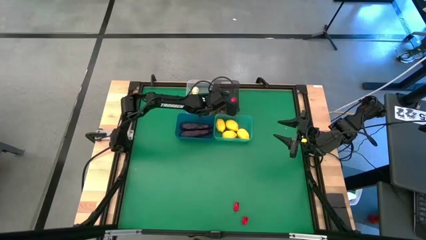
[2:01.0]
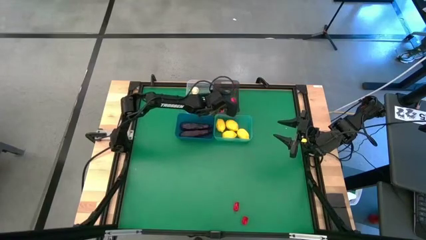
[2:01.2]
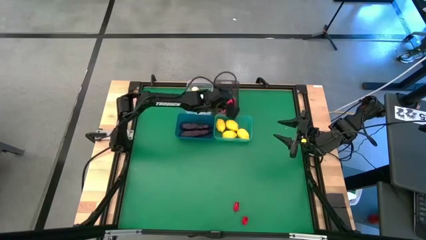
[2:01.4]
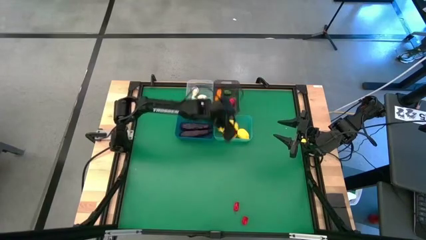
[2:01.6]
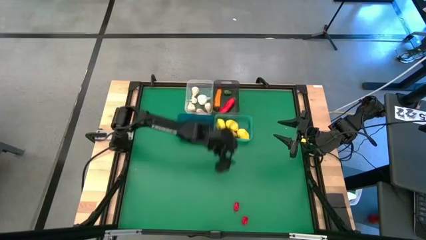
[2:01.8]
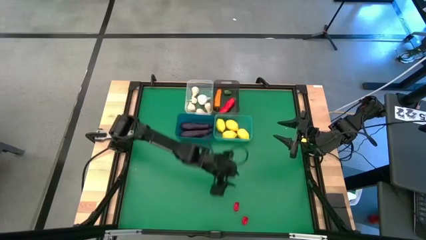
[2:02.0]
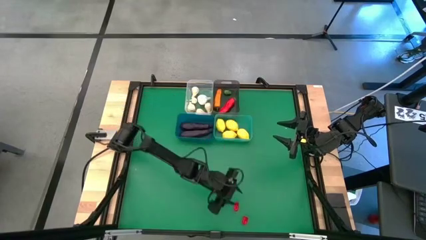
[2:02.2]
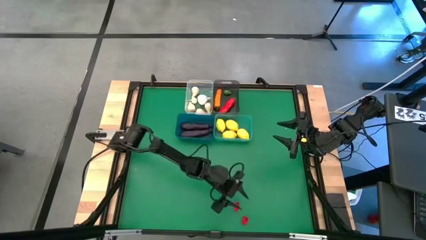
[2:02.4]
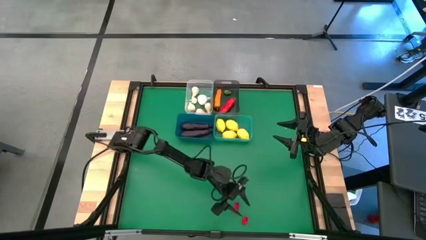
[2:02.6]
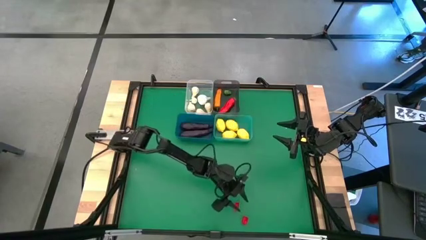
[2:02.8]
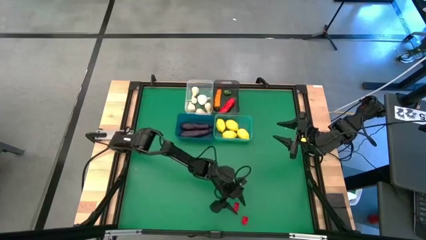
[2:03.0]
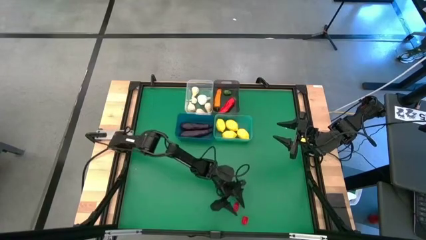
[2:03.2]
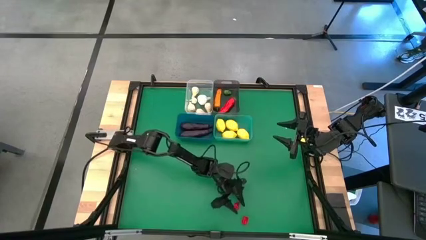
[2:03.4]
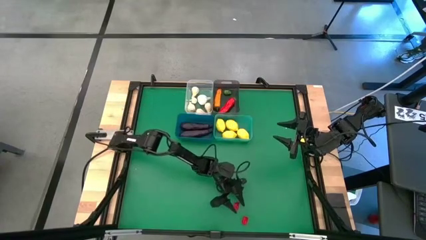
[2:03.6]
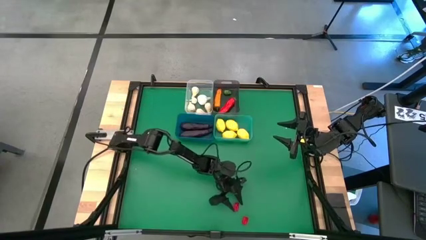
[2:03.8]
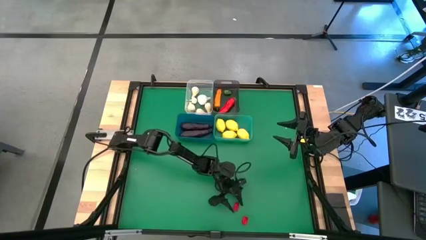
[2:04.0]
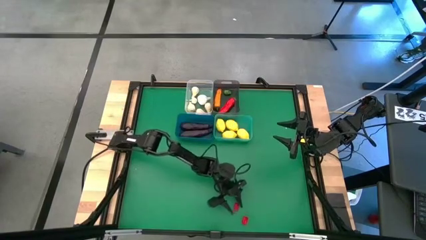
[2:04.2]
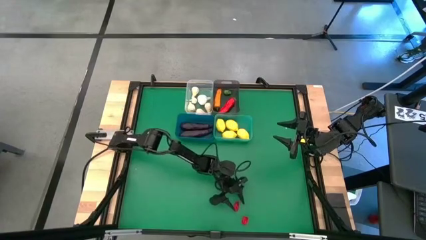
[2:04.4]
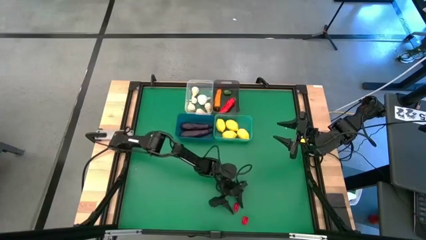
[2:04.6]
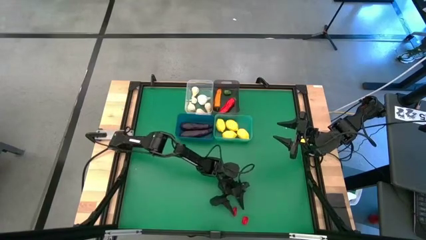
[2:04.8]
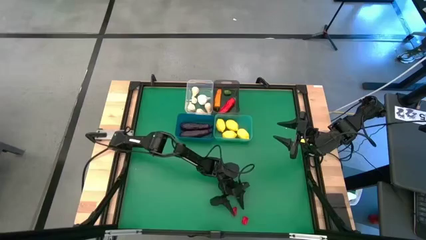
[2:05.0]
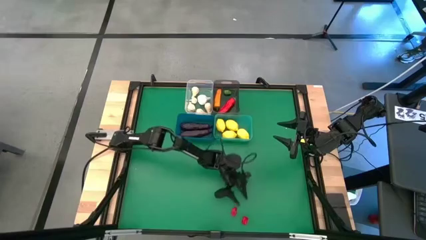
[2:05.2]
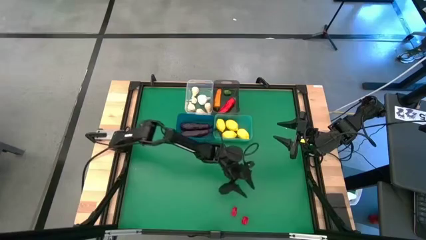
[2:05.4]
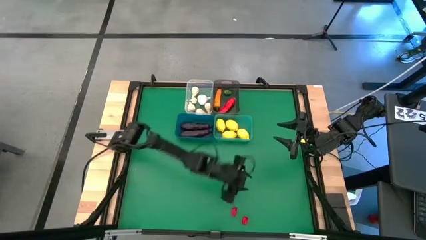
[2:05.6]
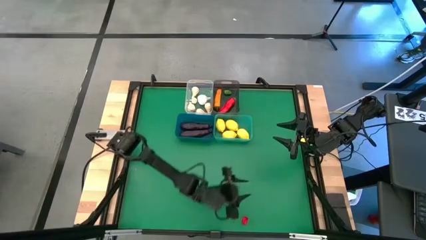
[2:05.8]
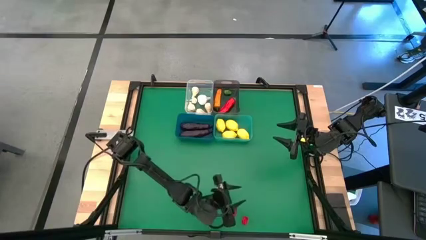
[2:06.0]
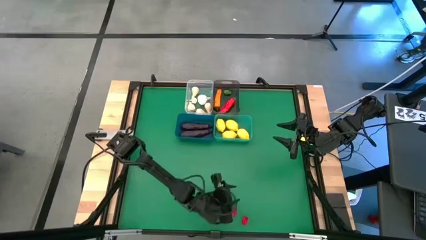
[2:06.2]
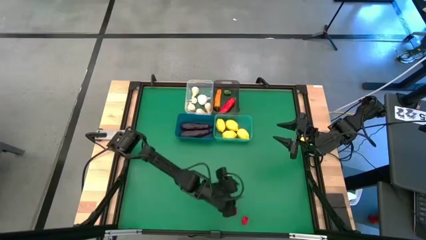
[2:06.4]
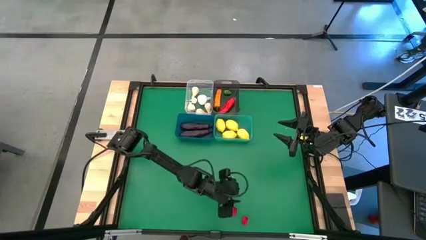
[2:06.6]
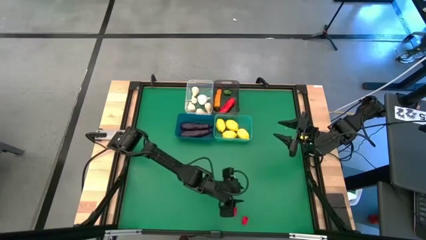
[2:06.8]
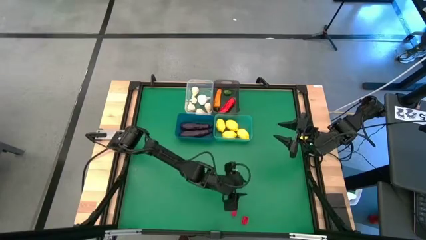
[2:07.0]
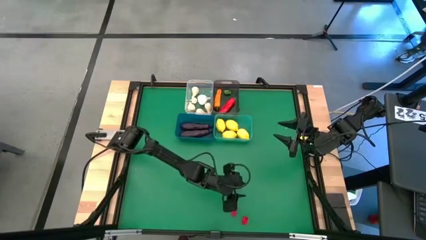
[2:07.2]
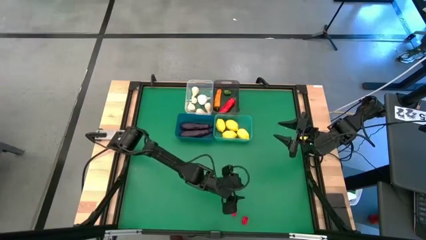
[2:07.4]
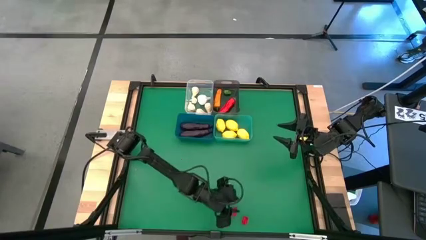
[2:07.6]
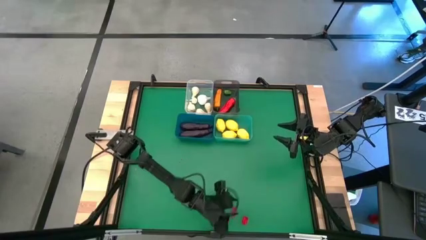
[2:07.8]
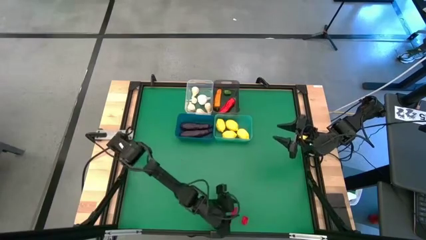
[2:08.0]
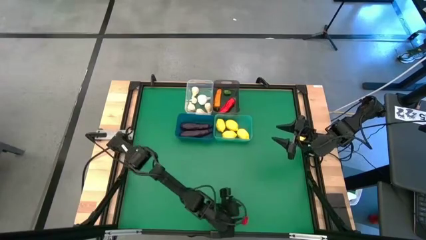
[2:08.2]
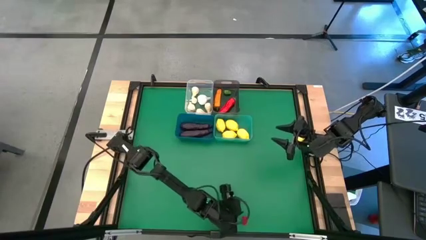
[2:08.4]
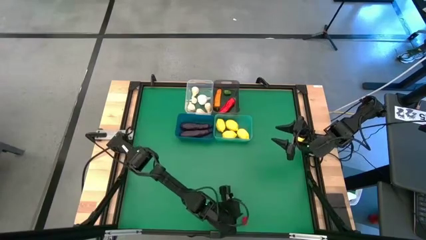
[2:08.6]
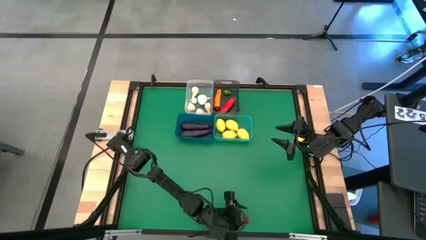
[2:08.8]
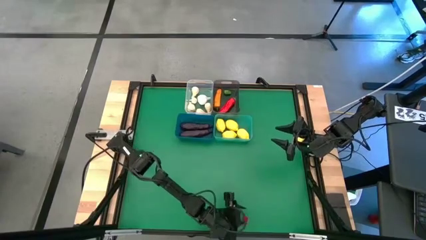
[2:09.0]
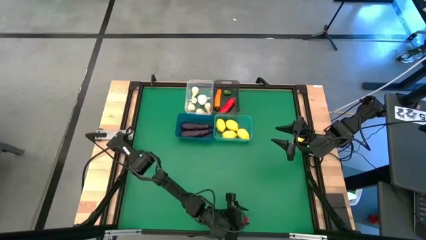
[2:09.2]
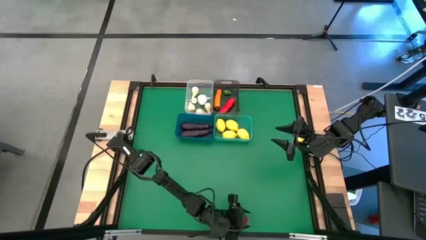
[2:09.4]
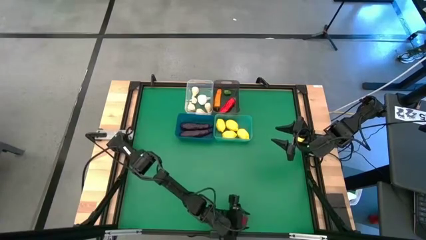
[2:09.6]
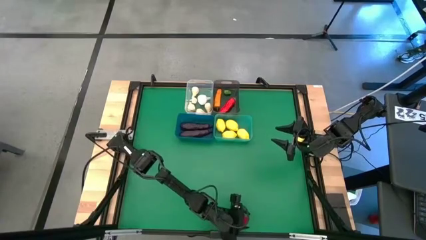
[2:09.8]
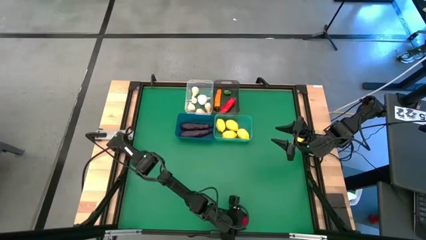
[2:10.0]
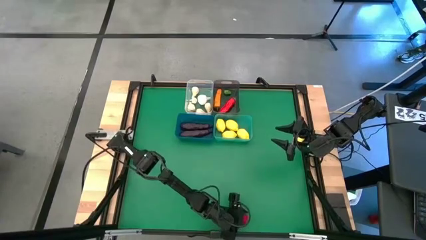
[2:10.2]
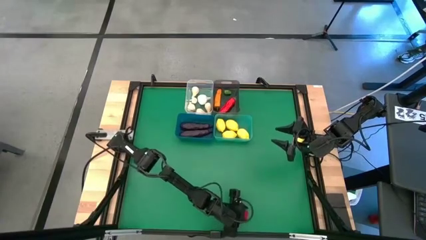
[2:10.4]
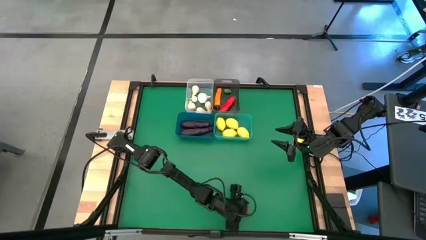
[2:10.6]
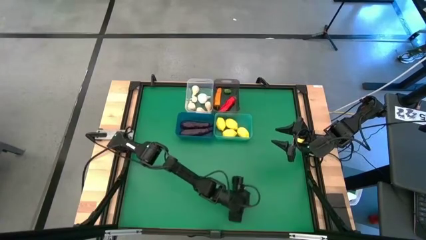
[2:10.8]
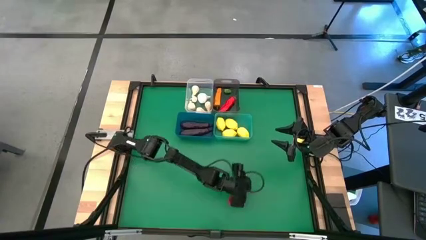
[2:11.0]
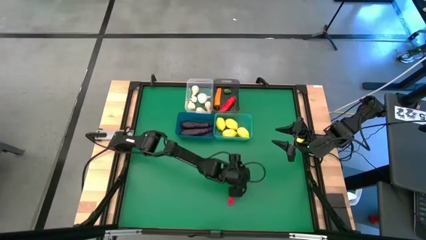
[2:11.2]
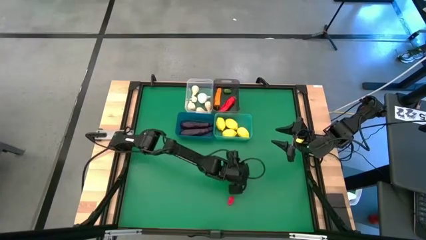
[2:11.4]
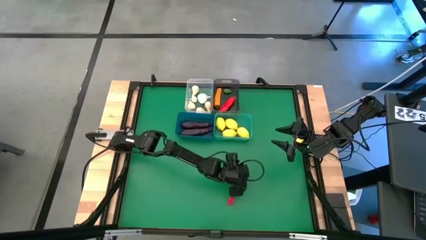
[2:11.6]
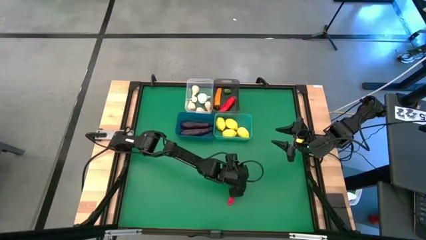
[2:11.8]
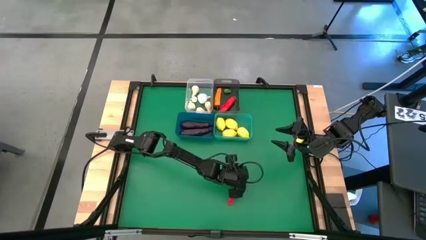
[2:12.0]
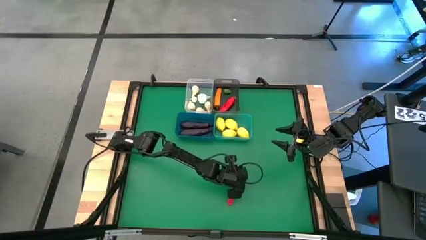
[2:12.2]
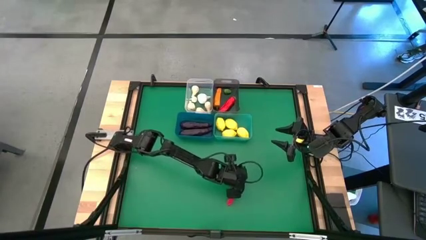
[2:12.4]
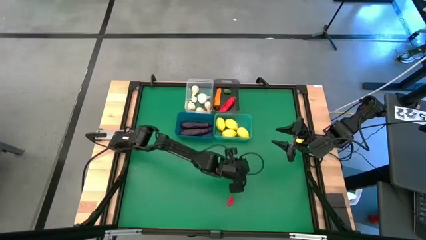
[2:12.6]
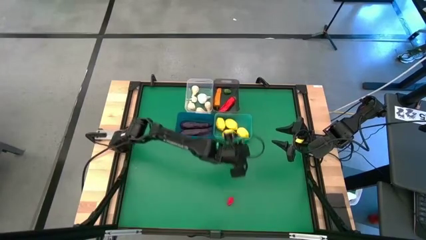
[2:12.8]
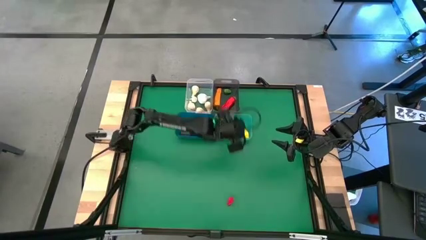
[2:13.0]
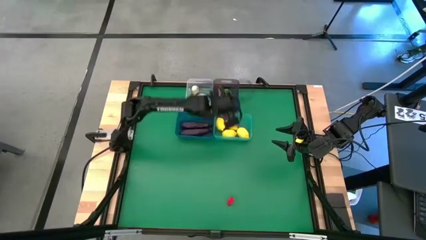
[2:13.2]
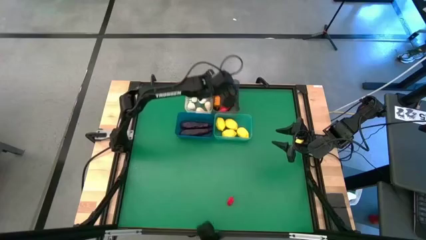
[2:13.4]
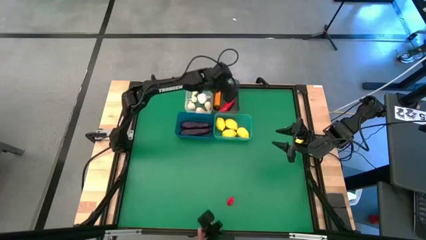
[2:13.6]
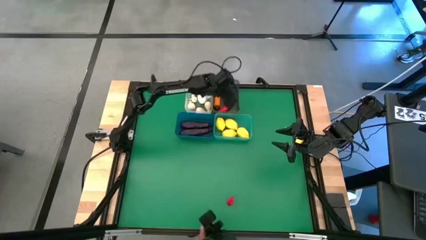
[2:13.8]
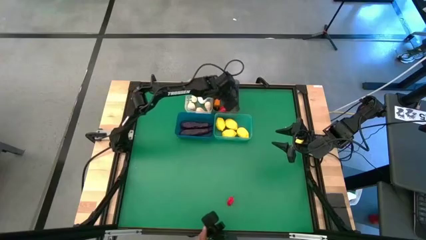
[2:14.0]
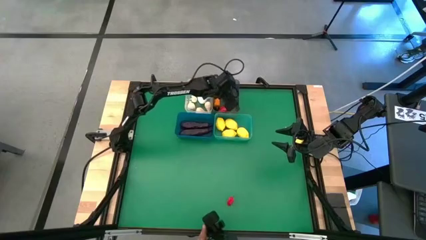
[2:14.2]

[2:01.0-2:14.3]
Task: Sort produce into baskets
Put the red chili pepper into the black bin

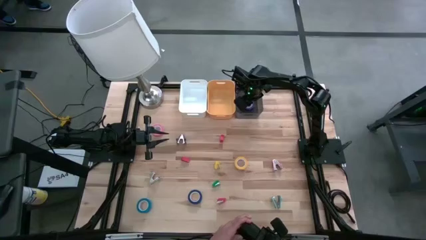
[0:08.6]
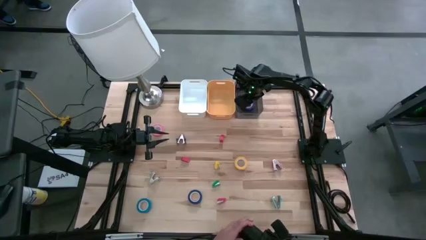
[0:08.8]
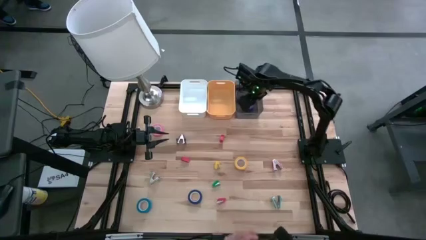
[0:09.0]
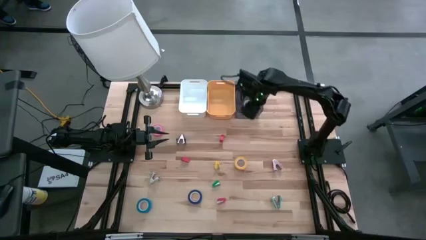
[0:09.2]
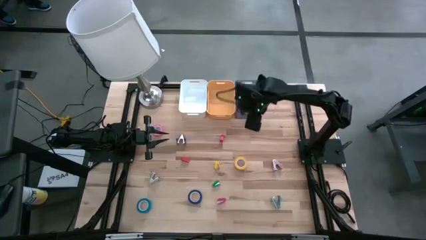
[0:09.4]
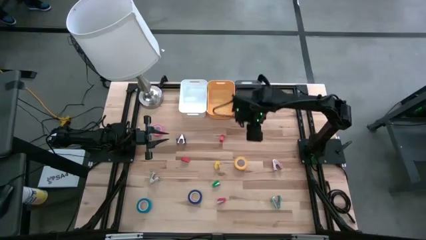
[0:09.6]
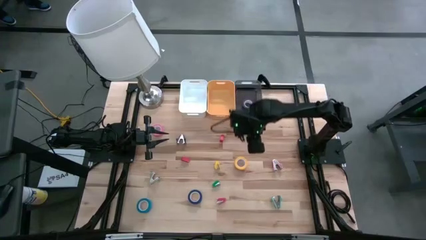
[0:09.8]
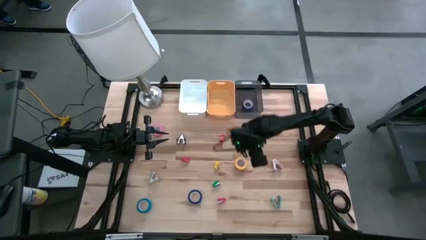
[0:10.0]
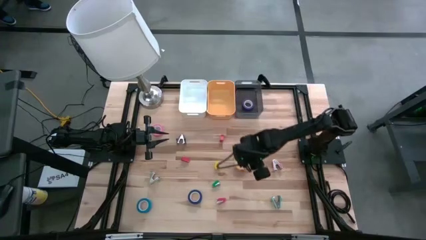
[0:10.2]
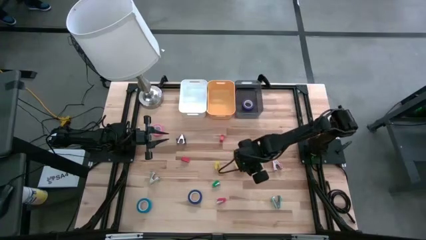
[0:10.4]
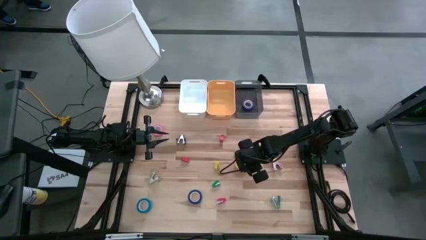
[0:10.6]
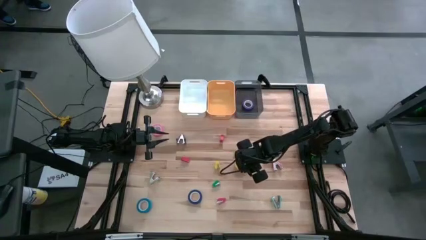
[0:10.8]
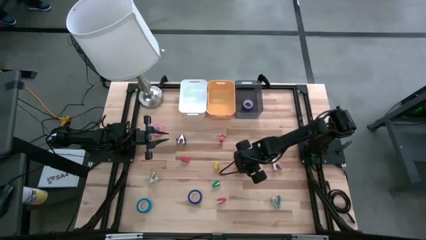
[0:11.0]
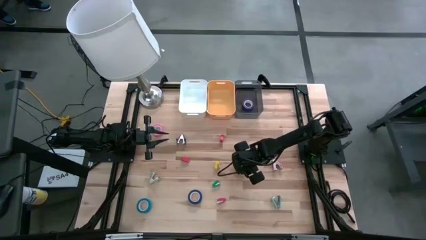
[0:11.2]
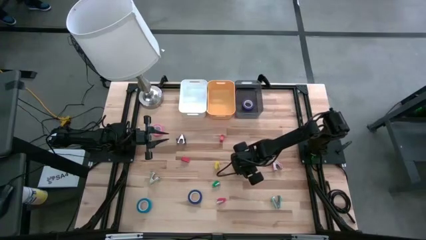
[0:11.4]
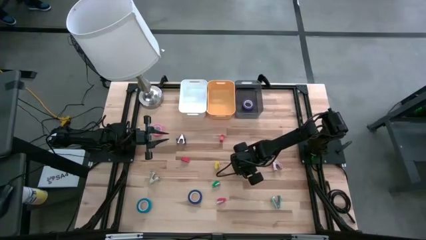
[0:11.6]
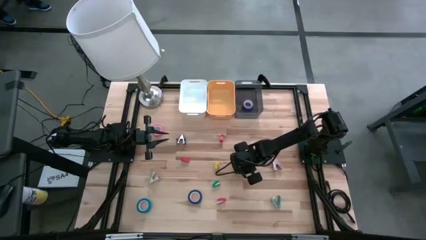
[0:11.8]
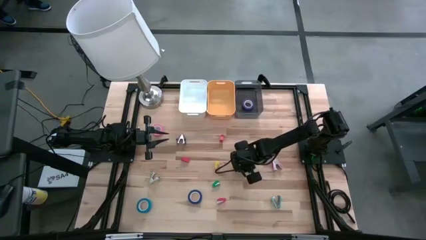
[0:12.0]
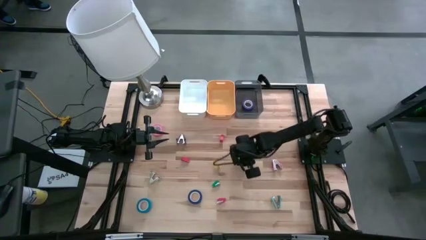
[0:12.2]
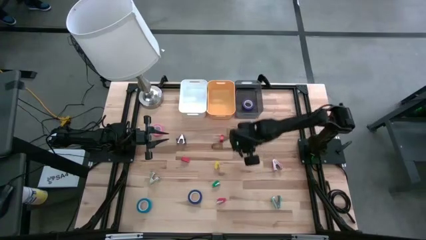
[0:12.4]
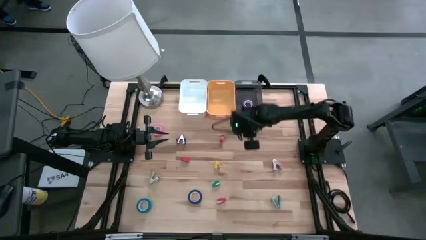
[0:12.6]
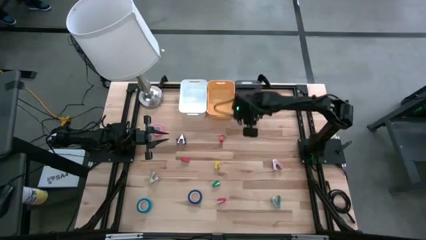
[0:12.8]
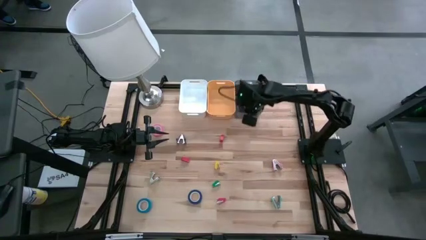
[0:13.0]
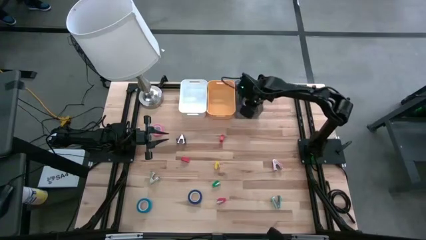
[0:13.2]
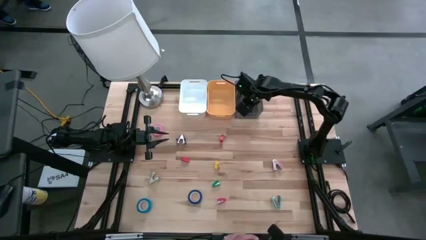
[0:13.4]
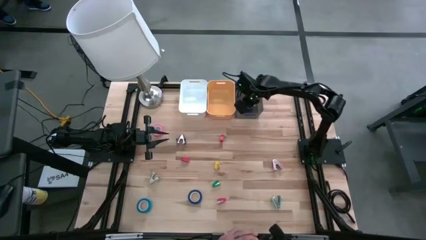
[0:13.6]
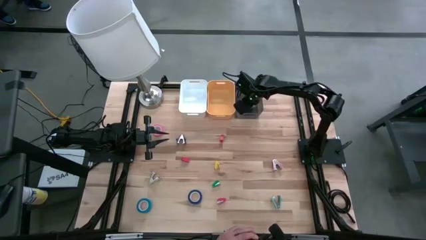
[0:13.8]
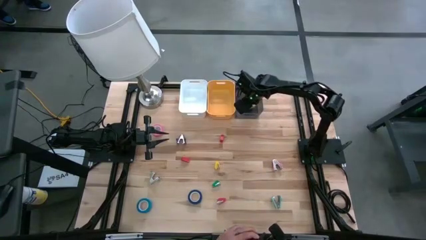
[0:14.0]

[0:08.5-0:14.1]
Task: Pick and place Stapler, Stapler remover, tape
Put the yellow tape into the black bin
